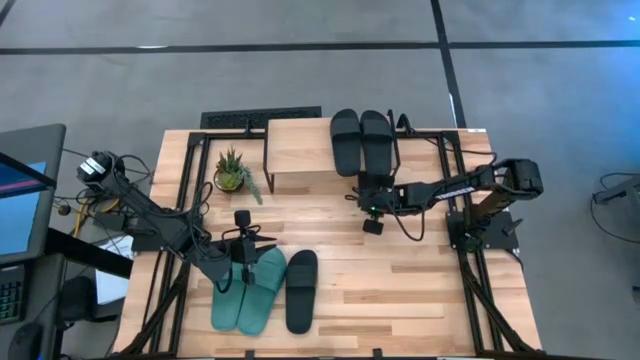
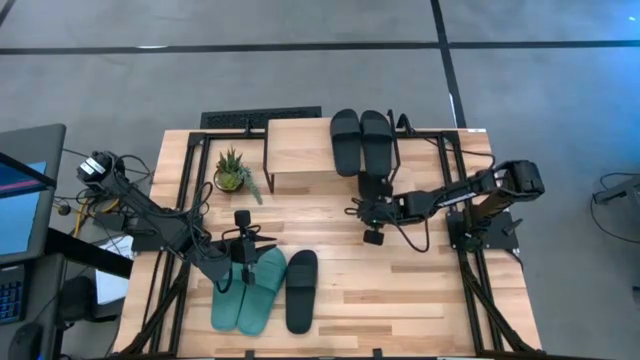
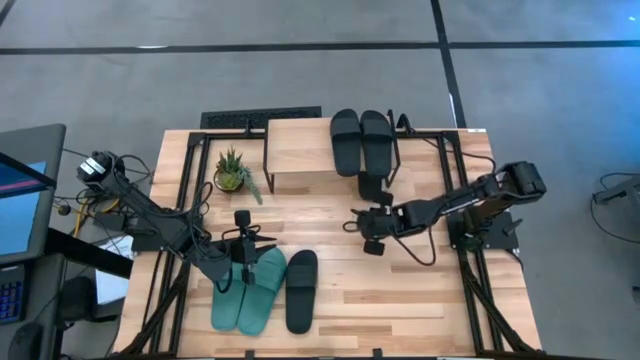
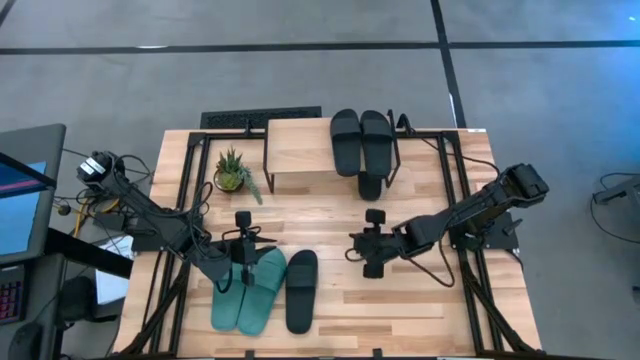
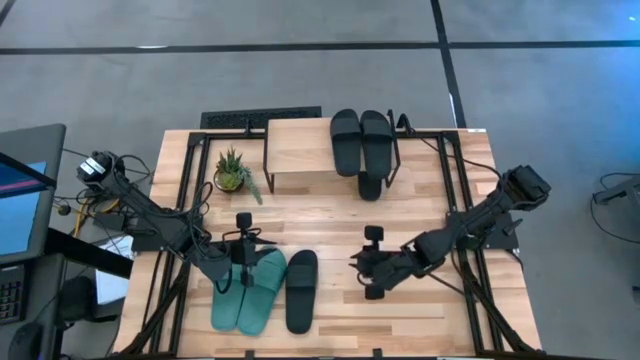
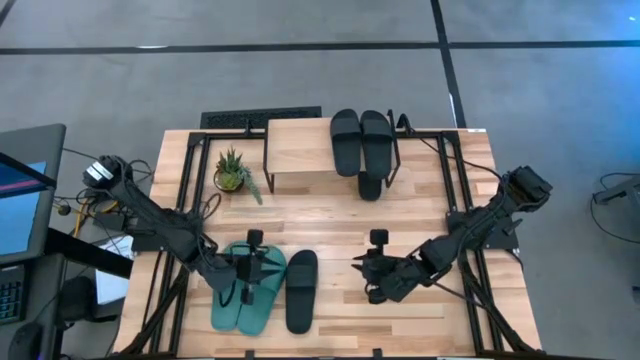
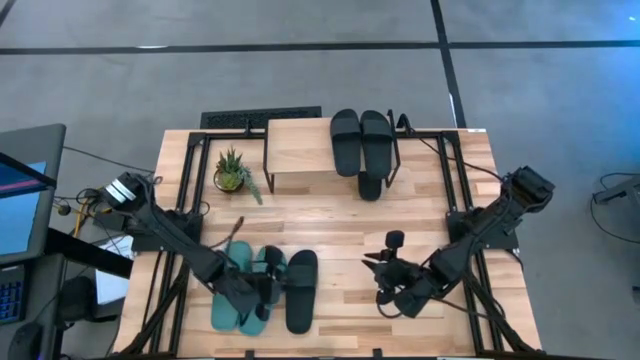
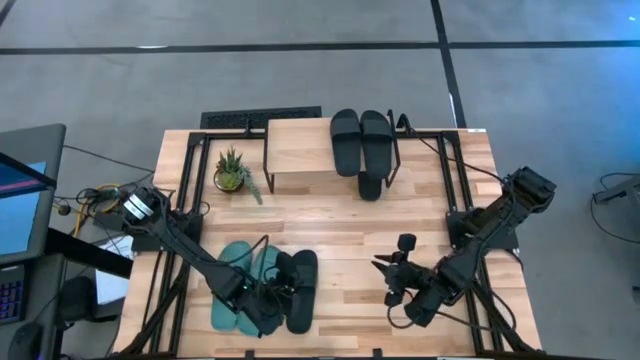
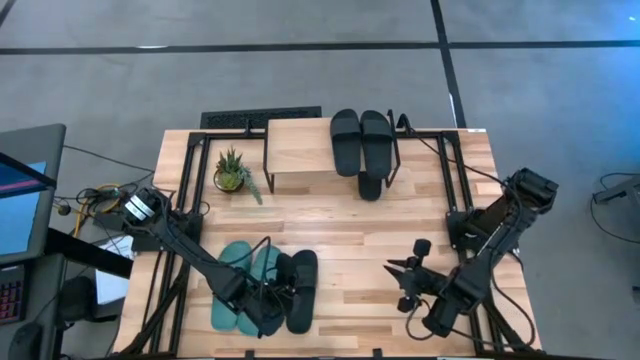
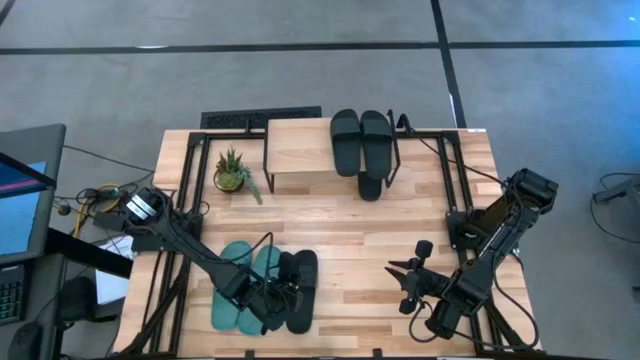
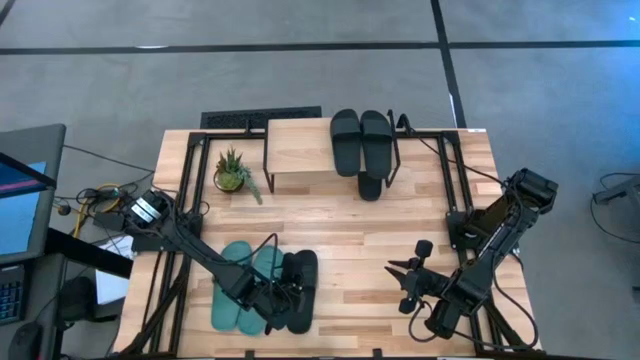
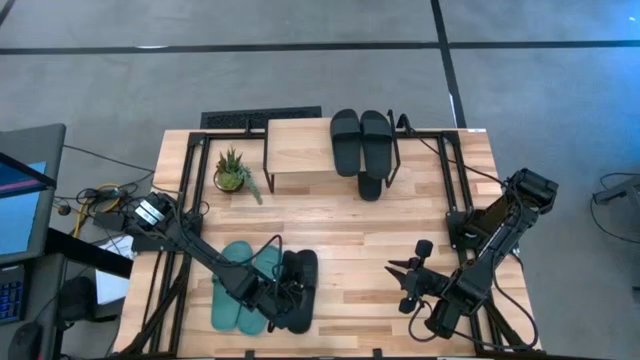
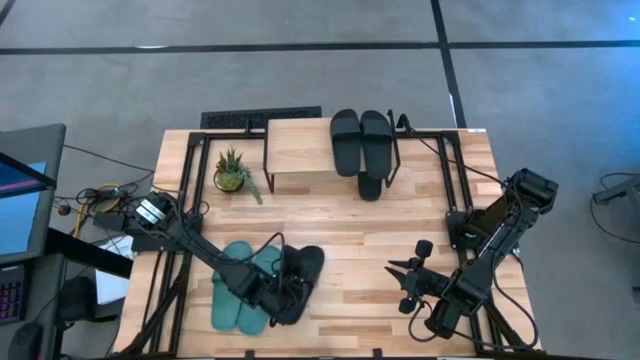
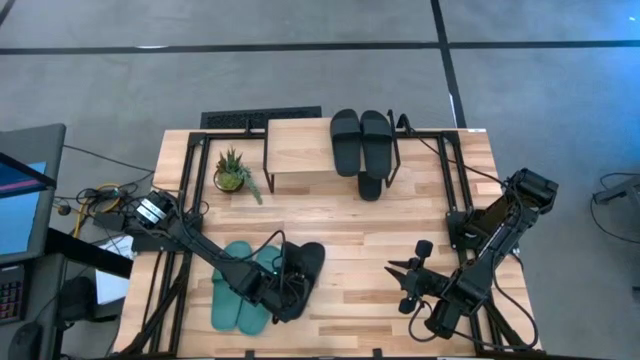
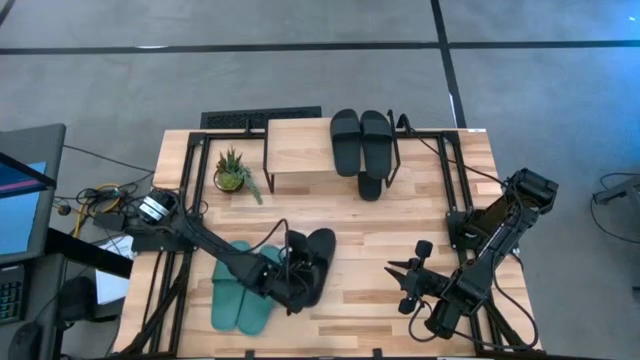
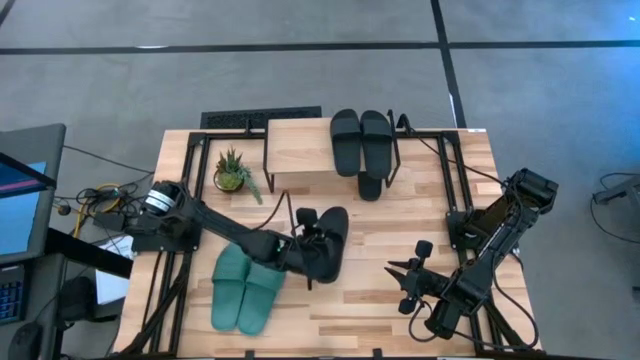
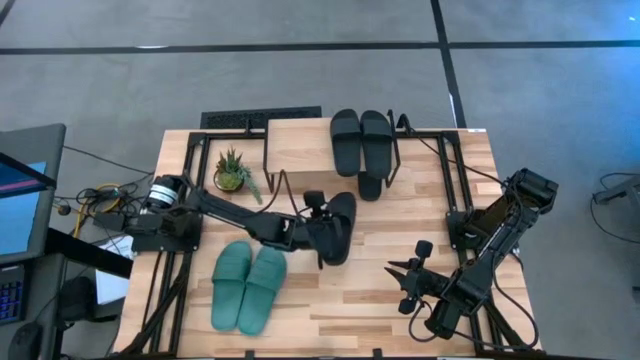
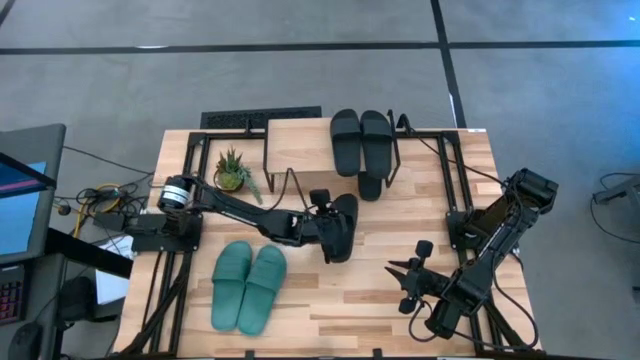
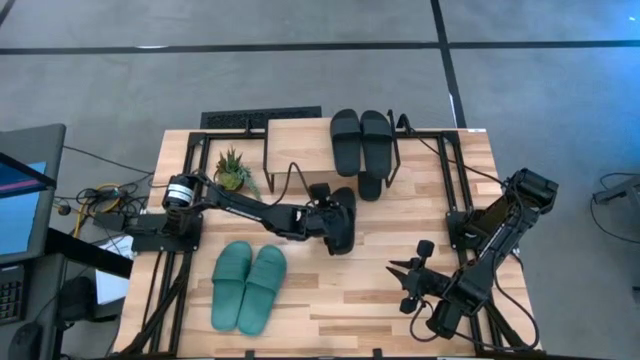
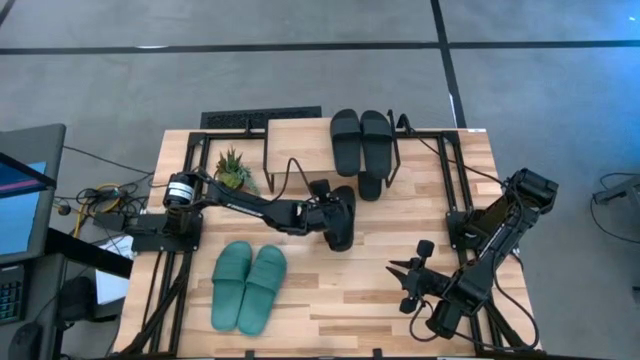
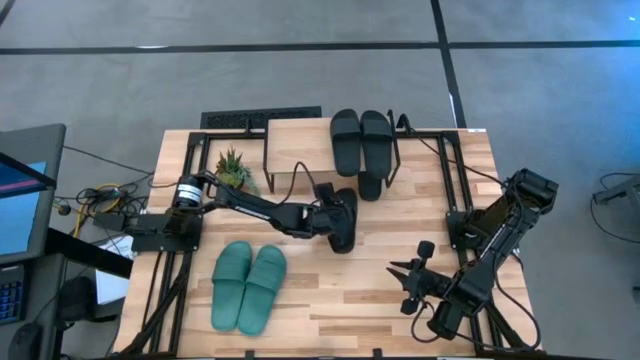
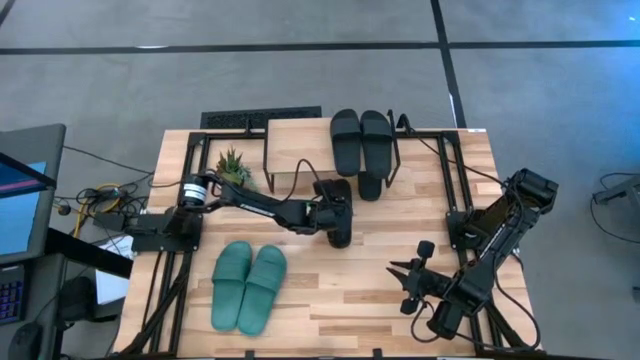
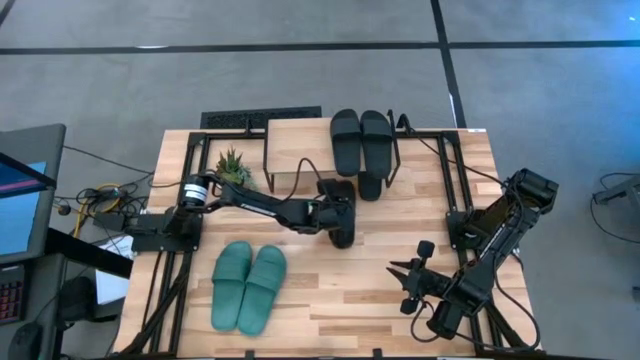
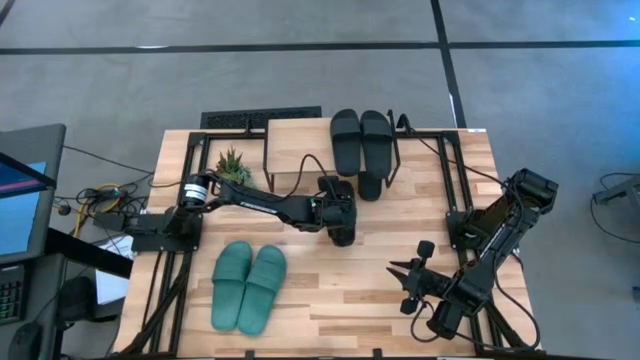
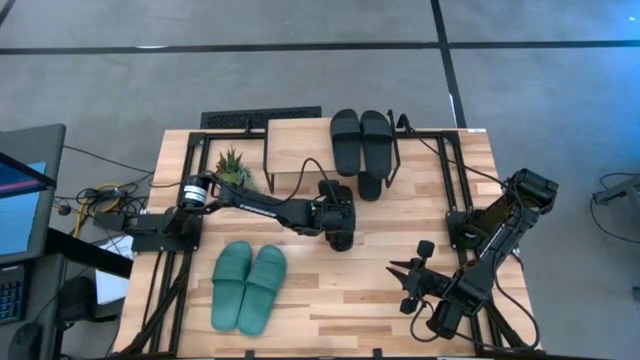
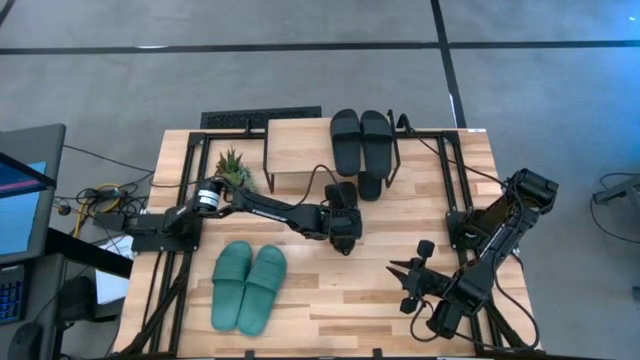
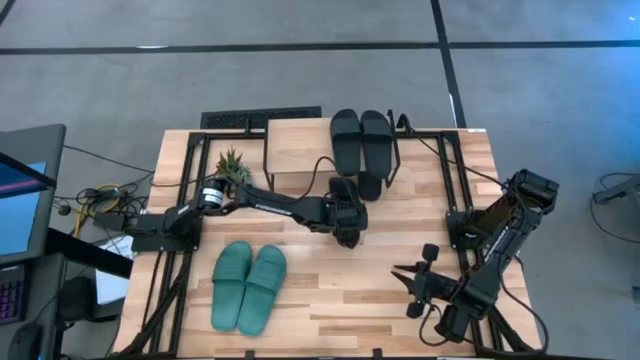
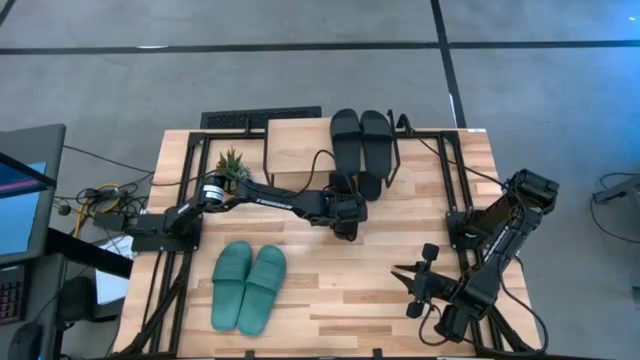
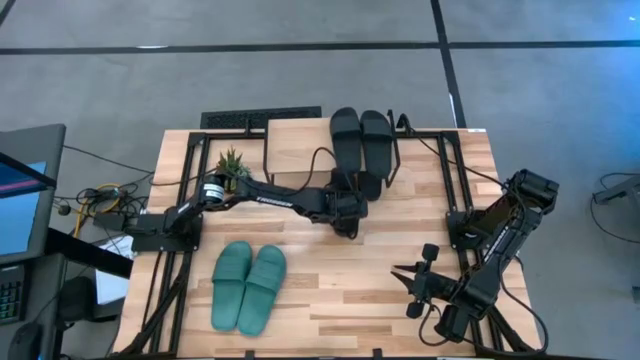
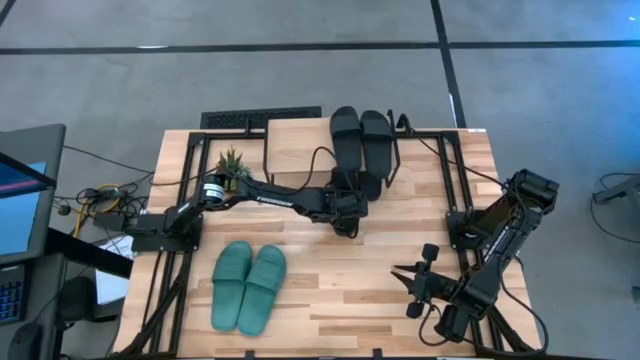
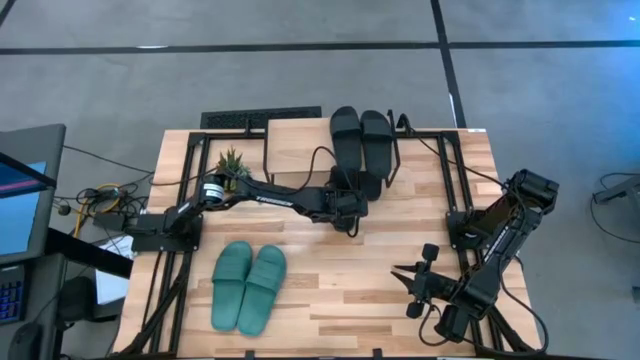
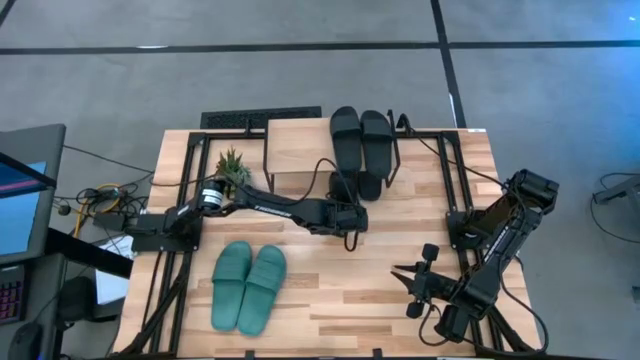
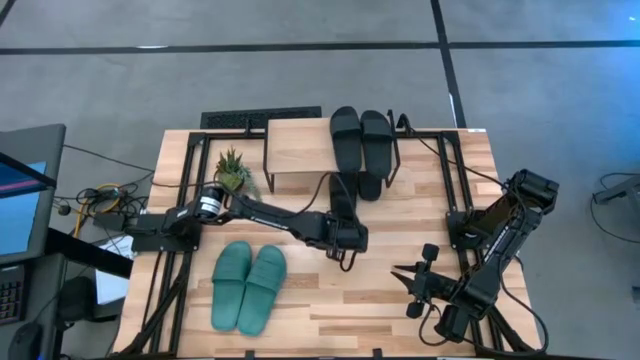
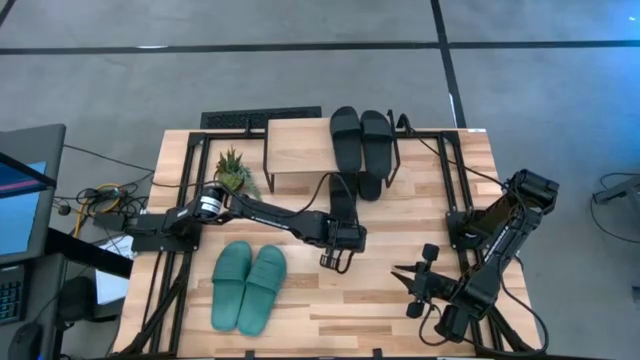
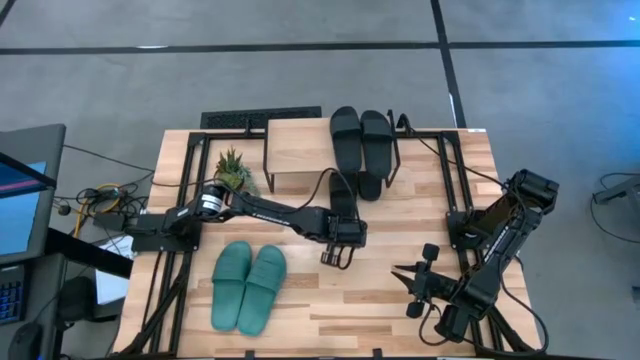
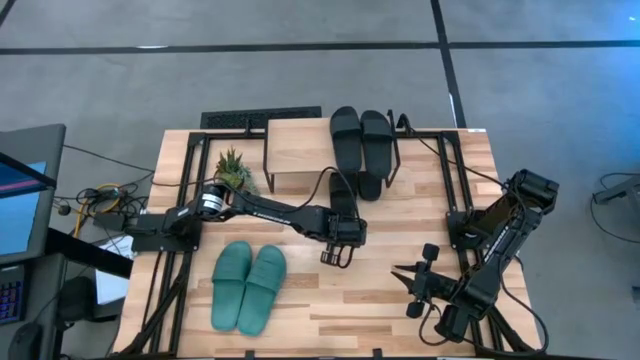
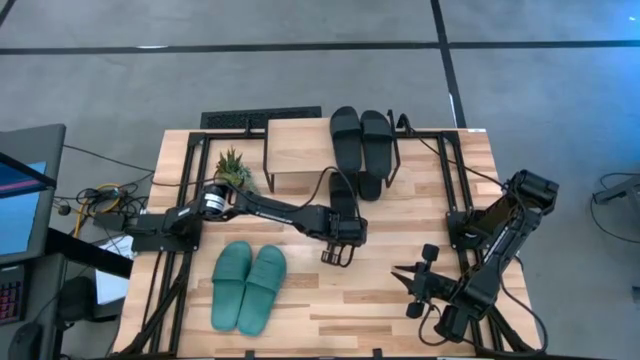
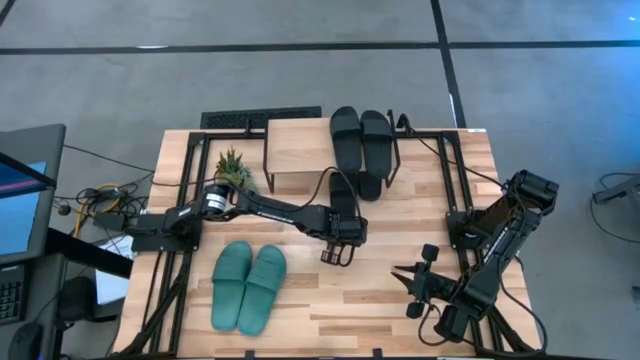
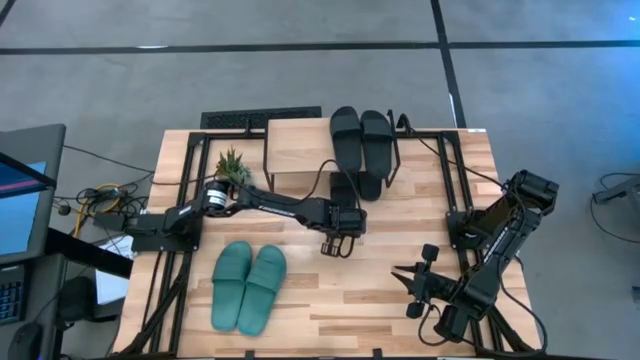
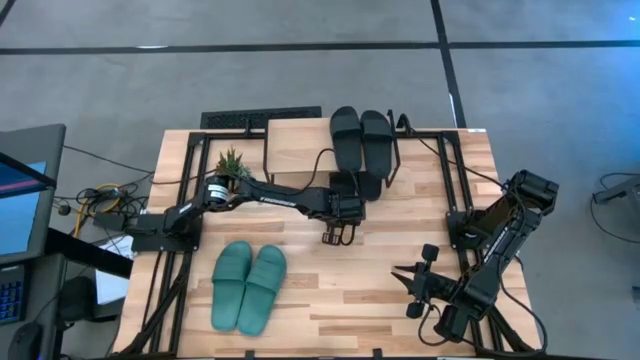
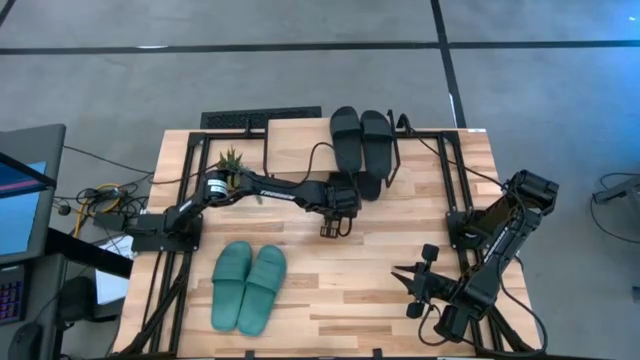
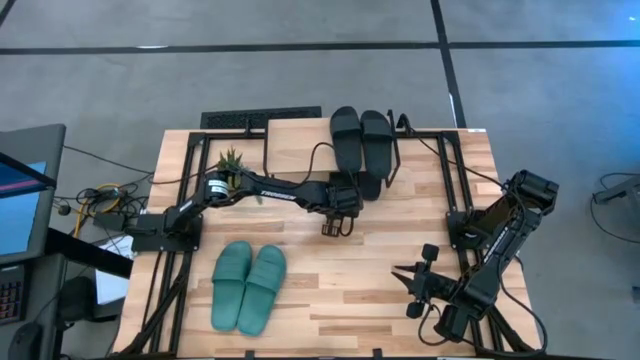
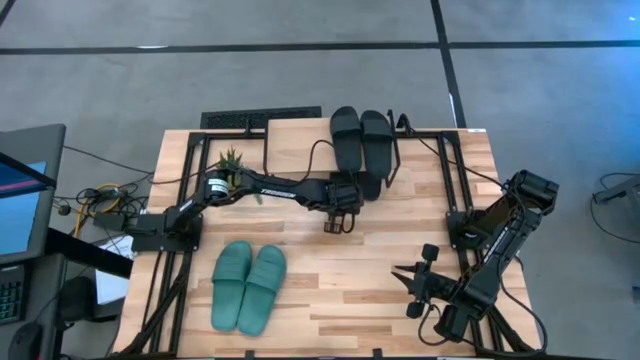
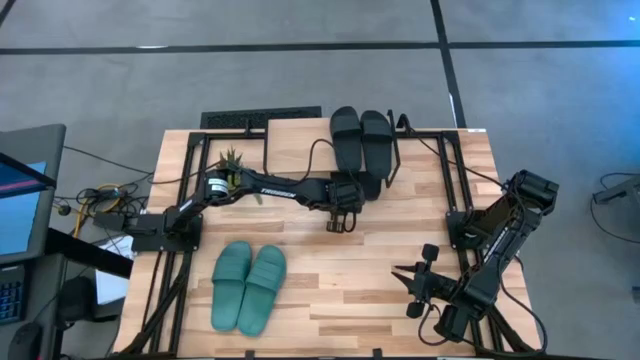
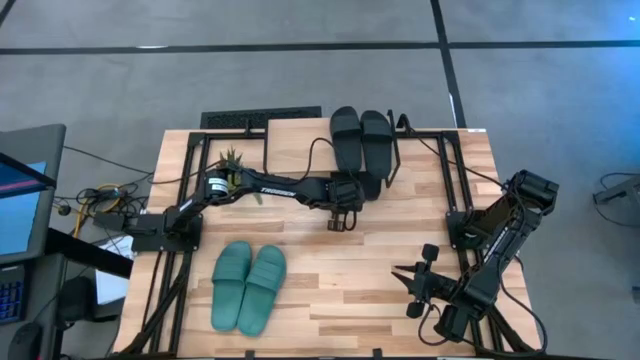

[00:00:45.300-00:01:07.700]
Task: Pick and place slides into the shelf
Put the black slipper under the shelf
